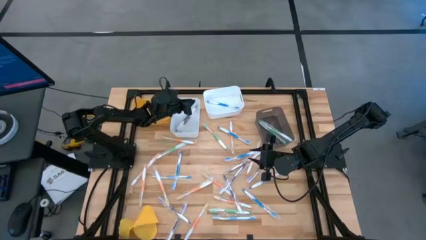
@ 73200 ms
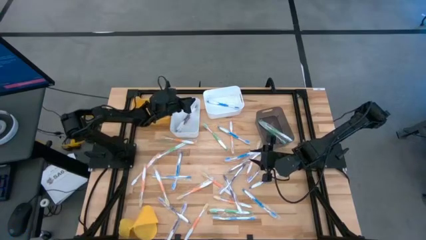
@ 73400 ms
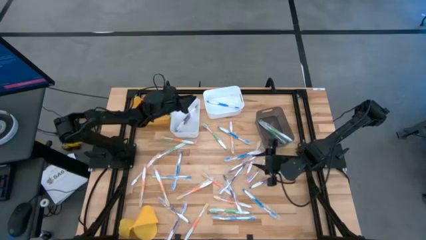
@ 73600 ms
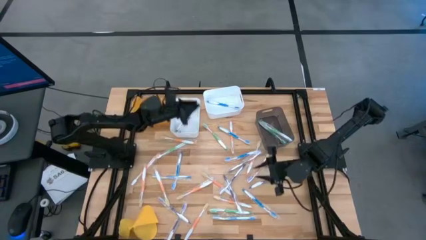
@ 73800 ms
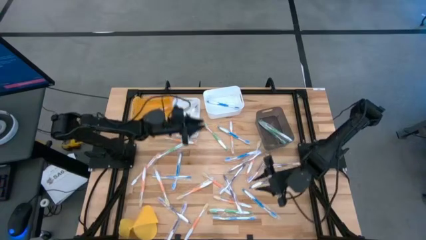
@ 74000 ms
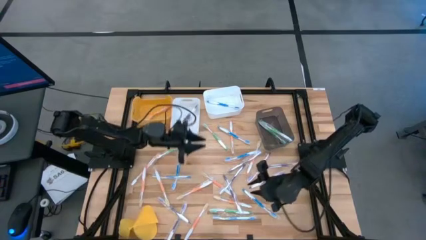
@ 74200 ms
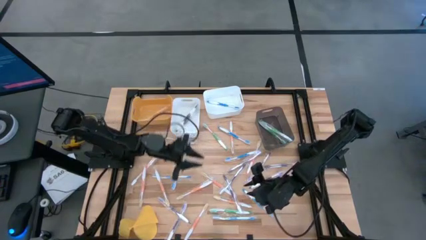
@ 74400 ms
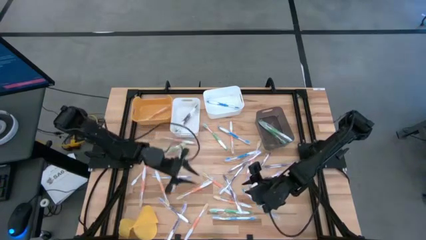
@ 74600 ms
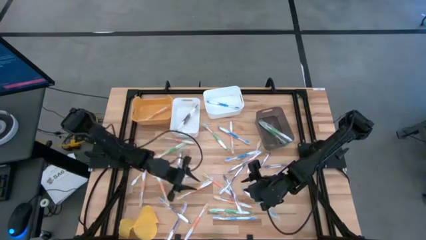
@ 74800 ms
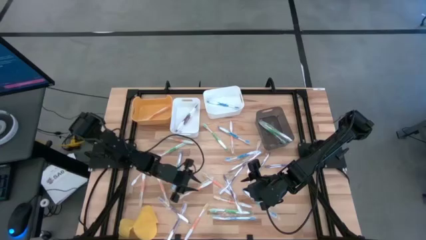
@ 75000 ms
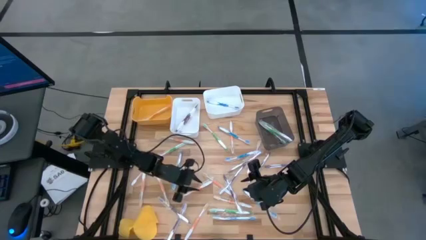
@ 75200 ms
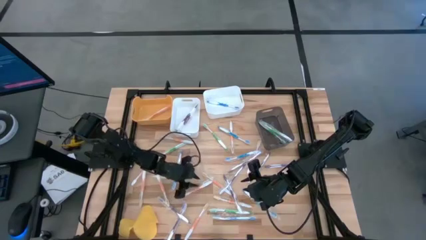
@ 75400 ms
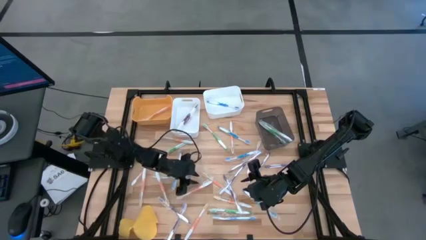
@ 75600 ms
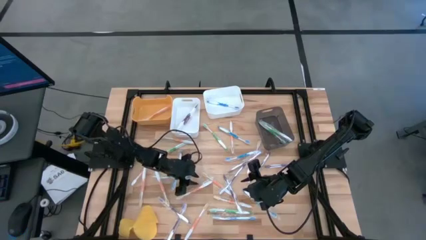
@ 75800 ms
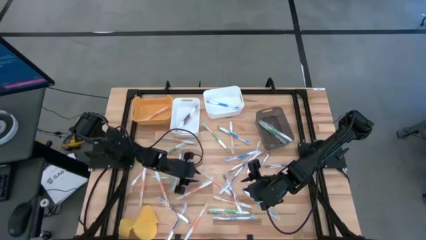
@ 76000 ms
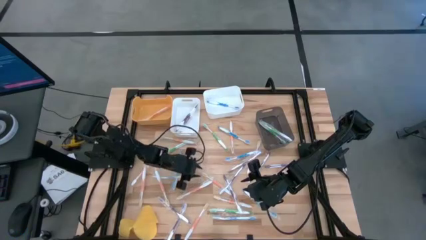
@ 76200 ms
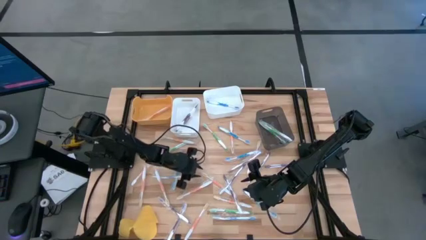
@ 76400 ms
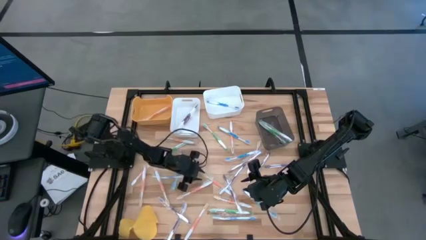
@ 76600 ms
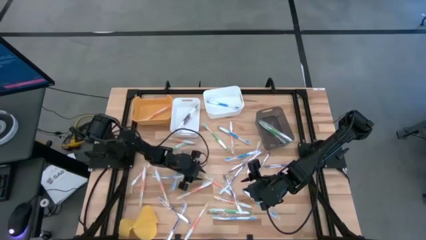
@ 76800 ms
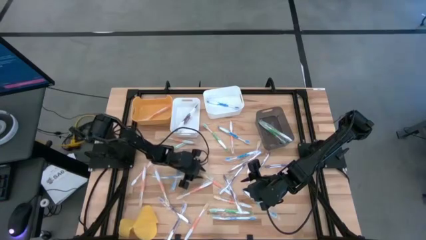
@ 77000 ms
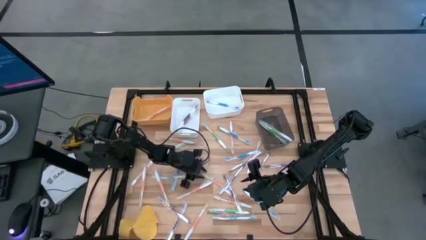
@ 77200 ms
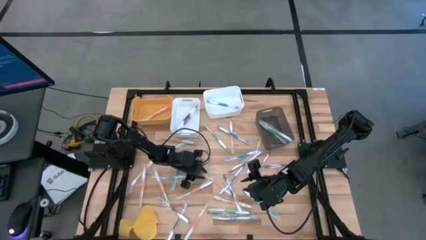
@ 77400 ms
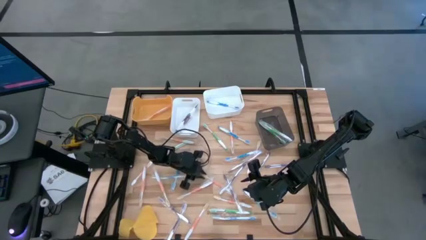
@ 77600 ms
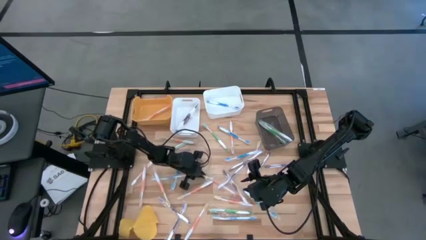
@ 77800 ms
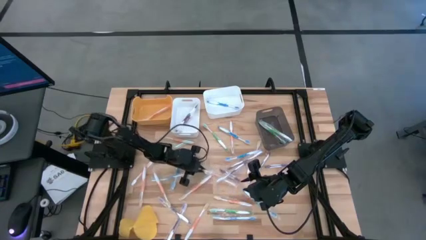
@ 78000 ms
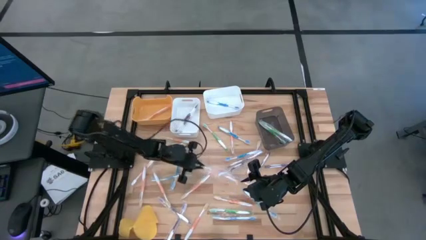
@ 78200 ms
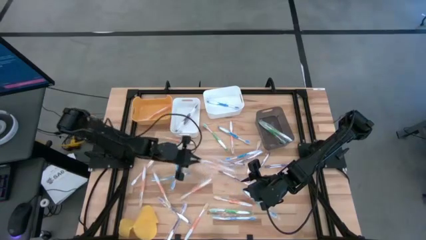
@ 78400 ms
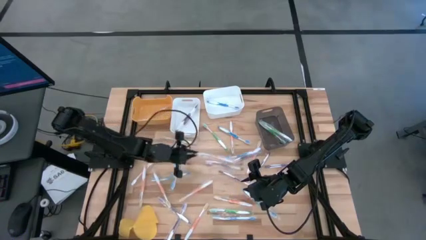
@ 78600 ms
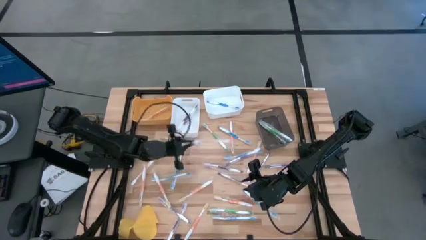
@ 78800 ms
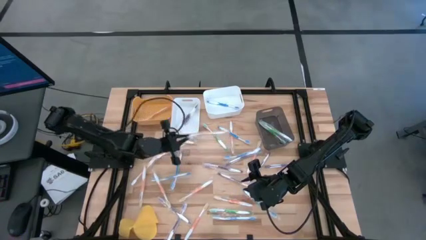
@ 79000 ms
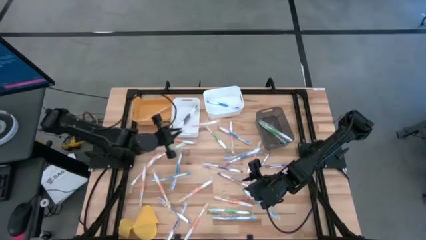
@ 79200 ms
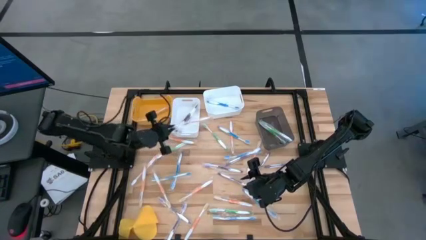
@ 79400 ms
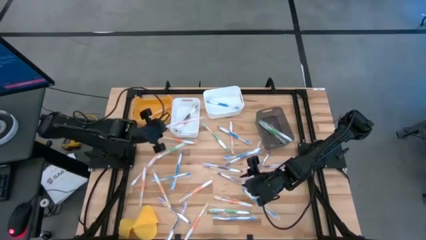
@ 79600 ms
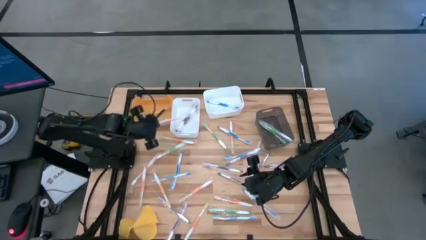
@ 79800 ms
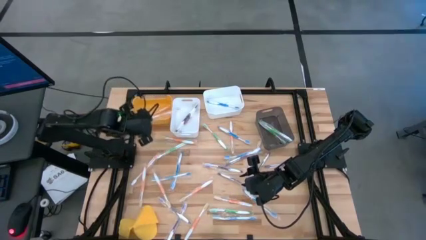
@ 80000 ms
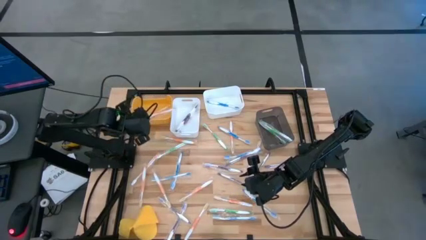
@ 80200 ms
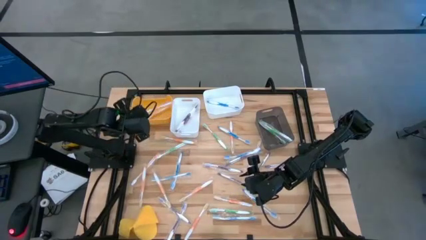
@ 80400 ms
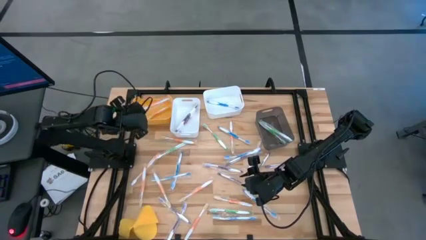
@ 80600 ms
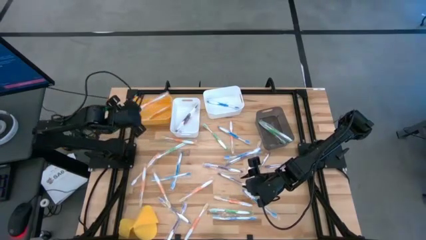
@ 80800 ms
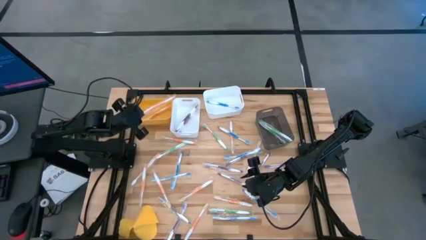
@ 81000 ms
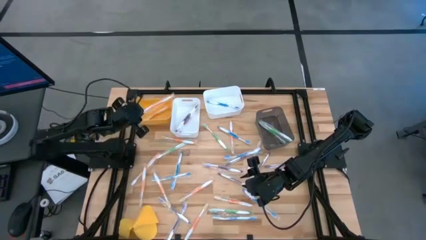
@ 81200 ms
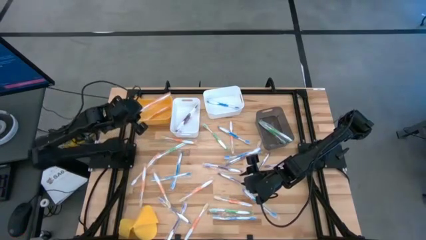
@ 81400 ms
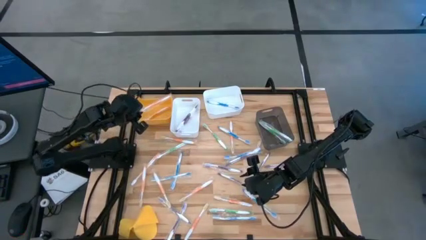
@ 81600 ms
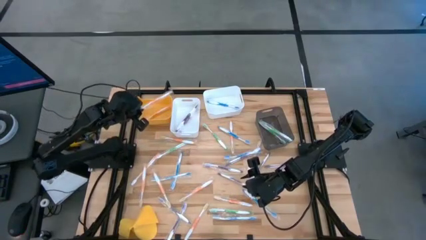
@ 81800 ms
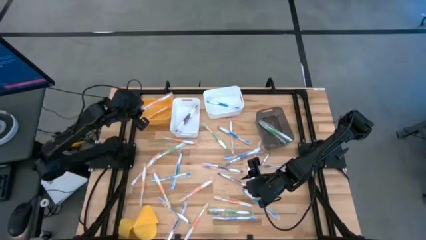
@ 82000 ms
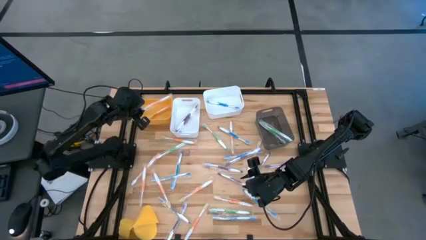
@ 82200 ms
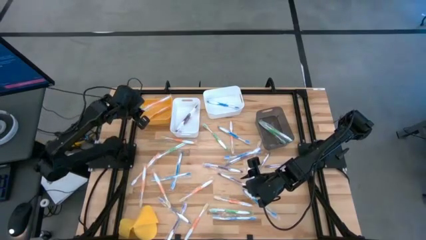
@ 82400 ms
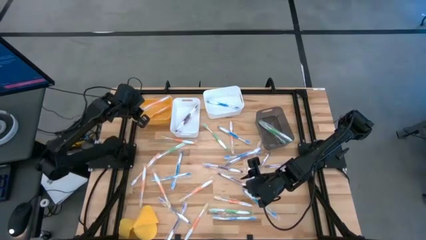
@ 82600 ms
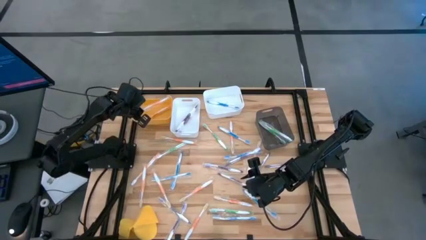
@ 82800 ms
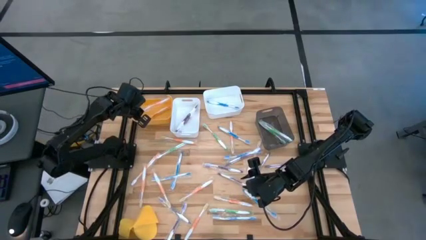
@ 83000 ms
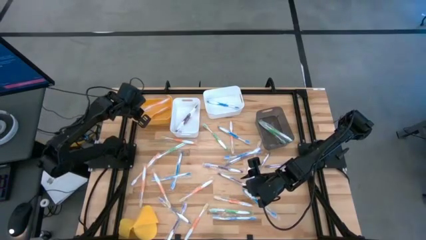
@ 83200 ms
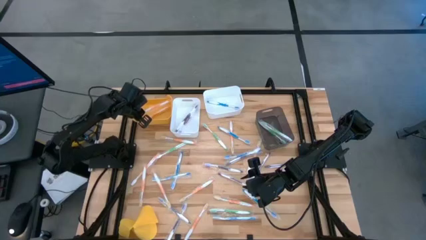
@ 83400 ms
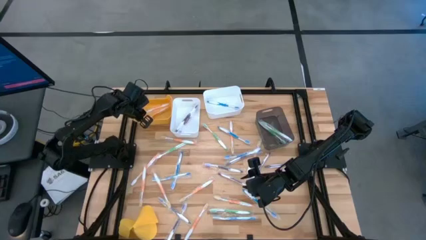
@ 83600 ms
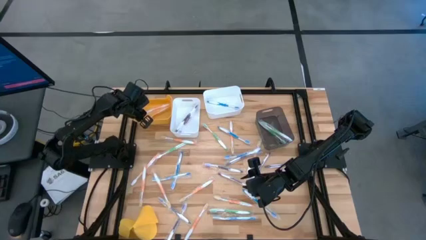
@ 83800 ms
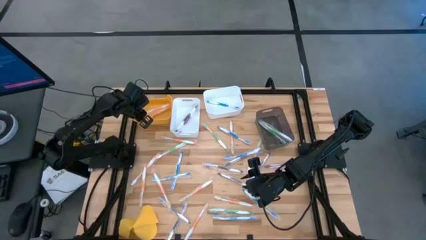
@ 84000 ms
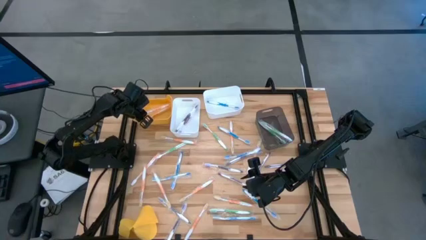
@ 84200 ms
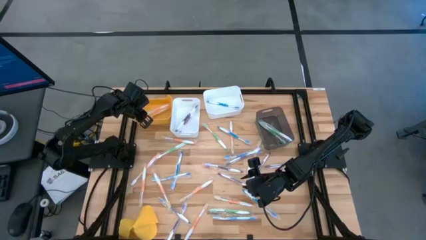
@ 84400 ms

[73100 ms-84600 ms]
Task: Pick & Place Toothbrushes
Put the orange toothbrush into the yellow bin

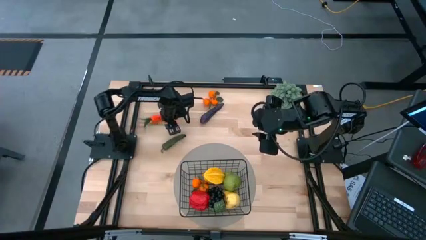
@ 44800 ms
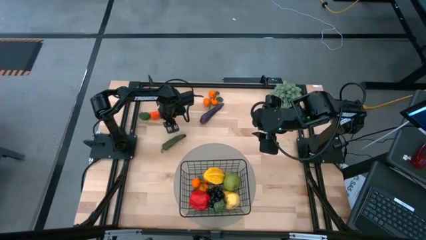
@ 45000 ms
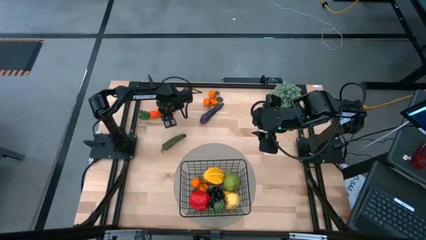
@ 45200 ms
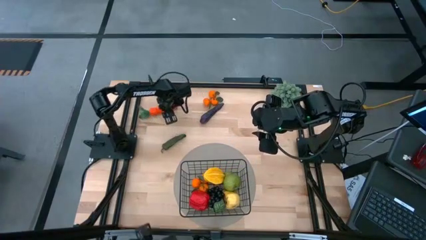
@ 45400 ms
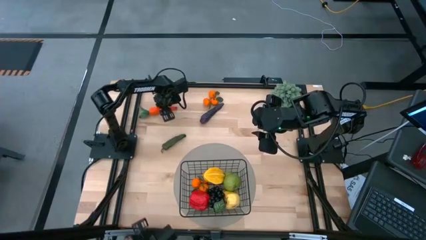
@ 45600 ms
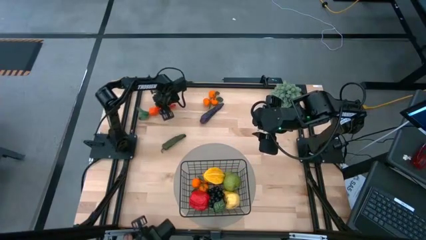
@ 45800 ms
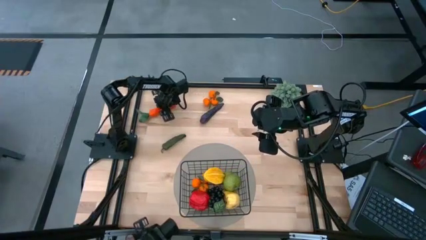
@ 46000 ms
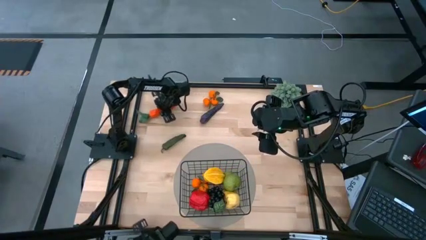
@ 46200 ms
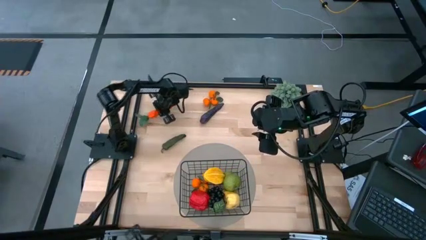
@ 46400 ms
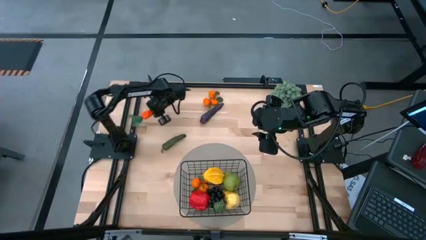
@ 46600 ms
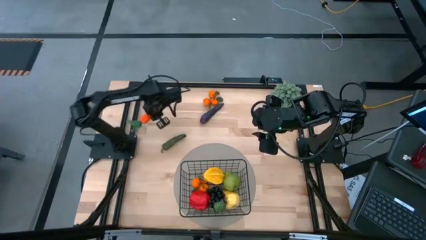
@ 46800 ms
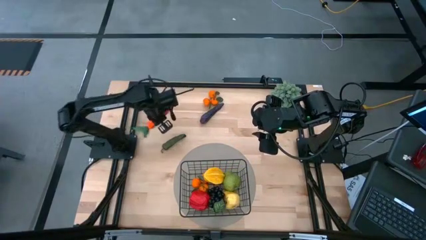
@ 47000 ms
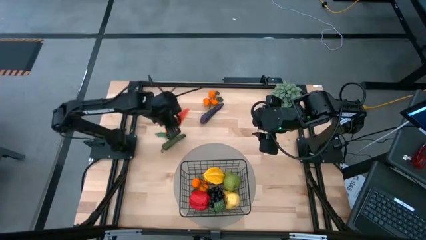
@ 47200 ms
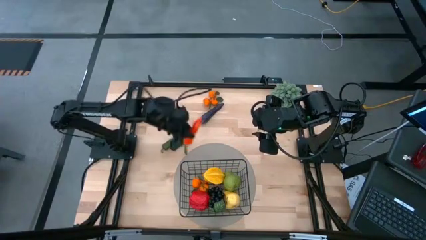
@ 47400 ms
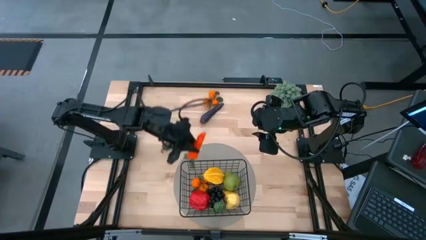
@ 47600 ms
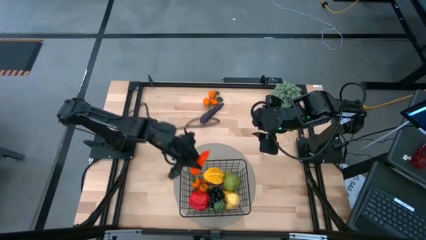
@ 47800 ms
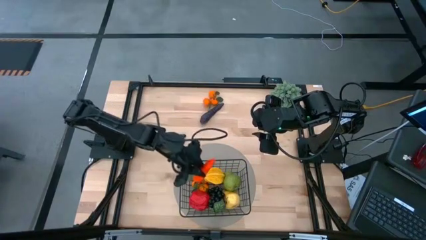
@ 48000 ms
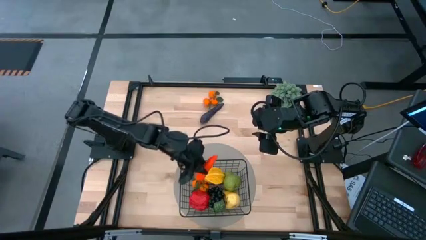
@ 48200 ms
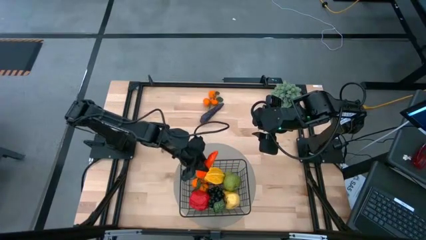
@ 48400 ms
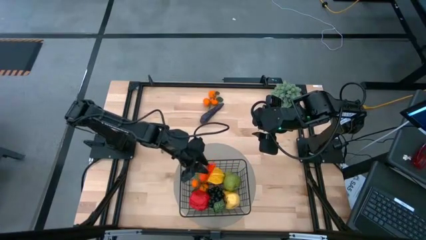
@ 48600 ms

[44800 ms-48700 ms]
Task: Build produce basket
Put the carrot into the black wire basket
